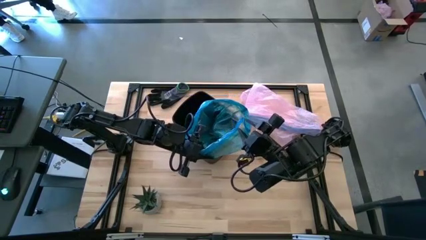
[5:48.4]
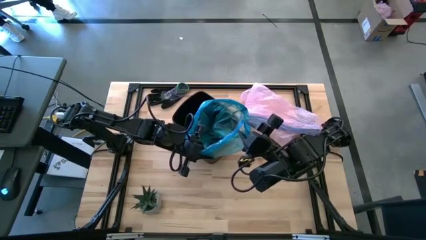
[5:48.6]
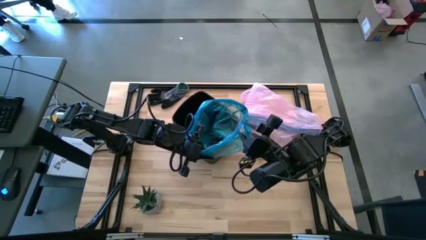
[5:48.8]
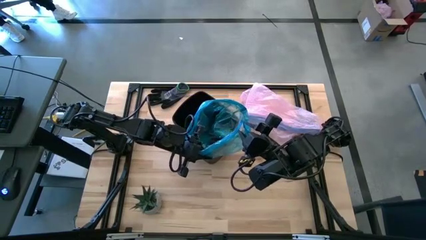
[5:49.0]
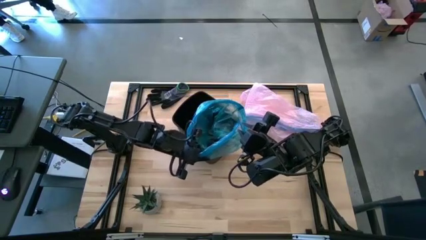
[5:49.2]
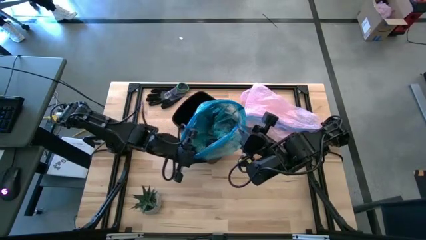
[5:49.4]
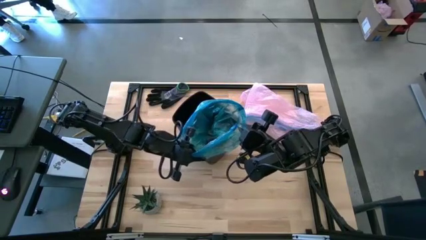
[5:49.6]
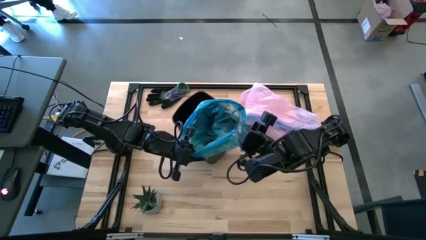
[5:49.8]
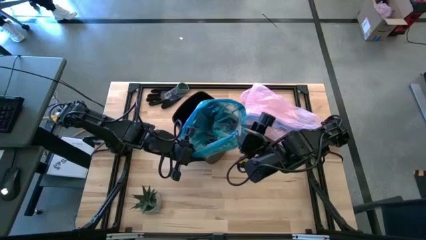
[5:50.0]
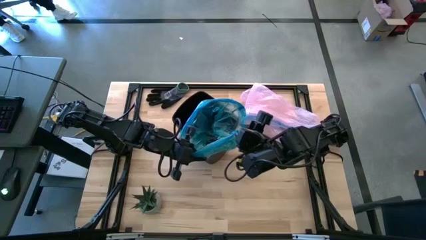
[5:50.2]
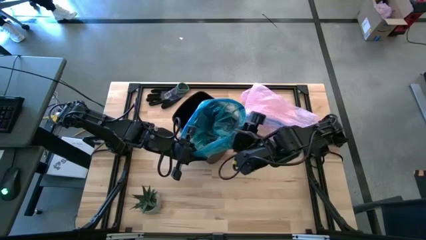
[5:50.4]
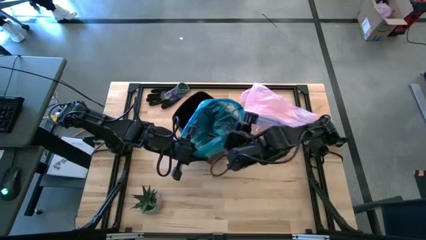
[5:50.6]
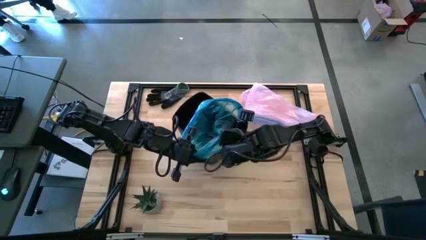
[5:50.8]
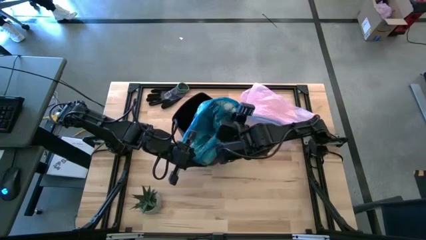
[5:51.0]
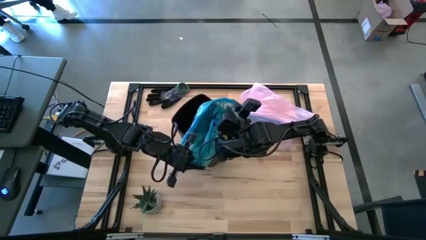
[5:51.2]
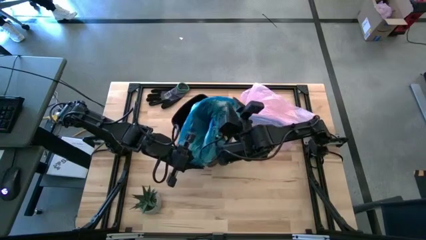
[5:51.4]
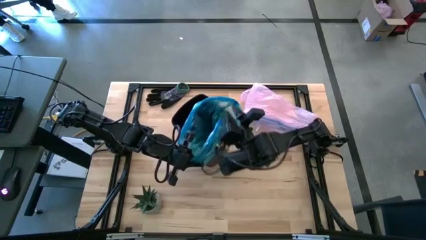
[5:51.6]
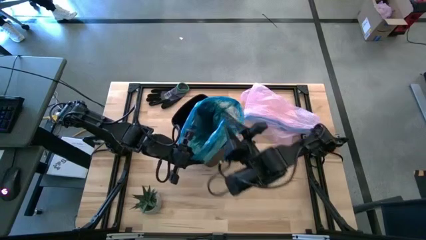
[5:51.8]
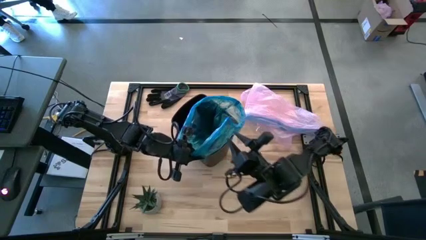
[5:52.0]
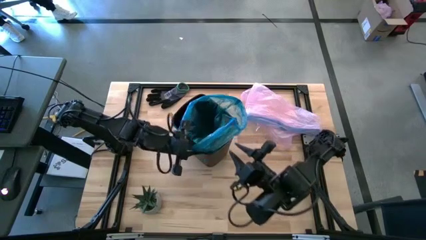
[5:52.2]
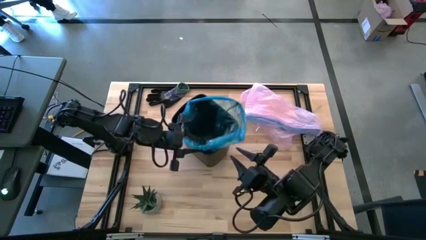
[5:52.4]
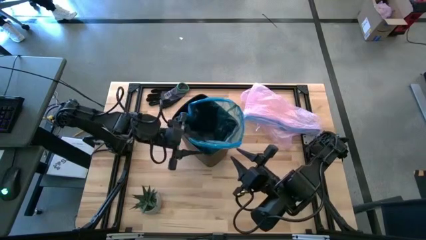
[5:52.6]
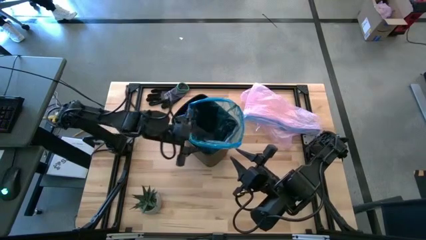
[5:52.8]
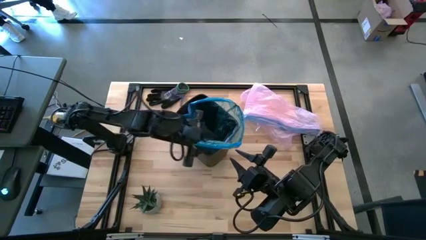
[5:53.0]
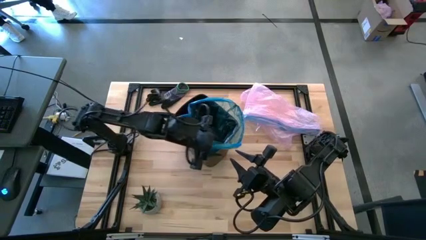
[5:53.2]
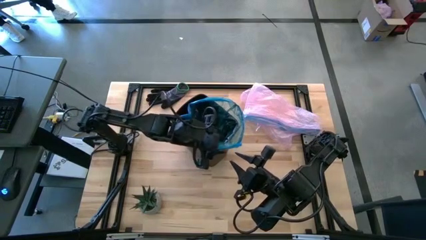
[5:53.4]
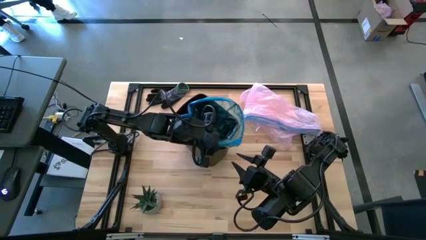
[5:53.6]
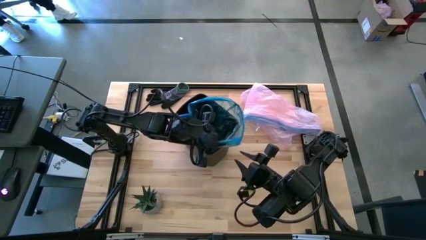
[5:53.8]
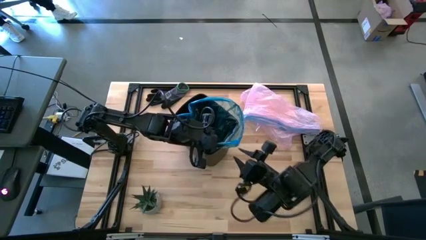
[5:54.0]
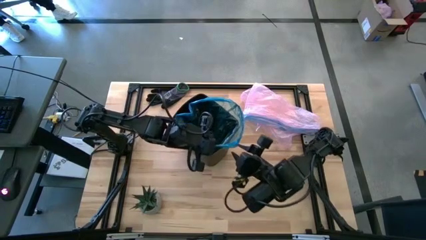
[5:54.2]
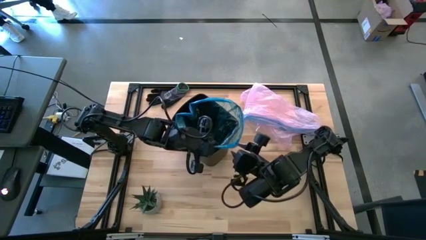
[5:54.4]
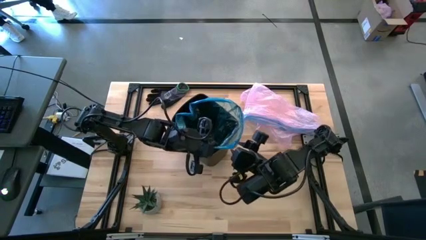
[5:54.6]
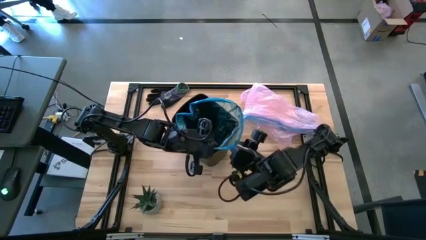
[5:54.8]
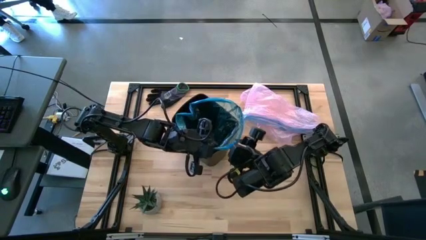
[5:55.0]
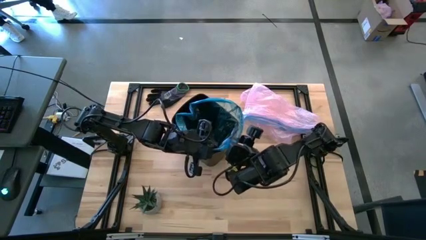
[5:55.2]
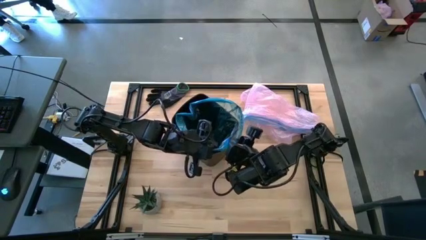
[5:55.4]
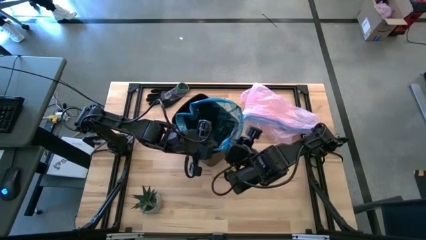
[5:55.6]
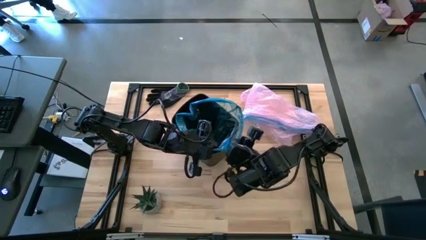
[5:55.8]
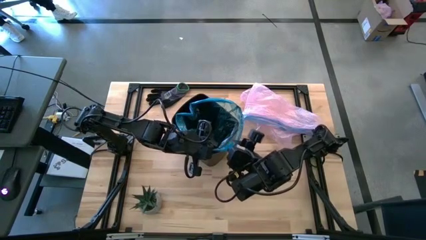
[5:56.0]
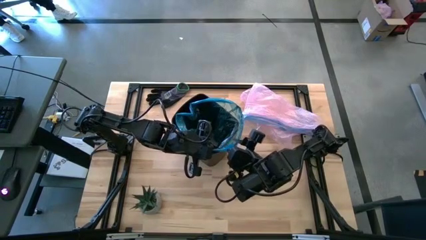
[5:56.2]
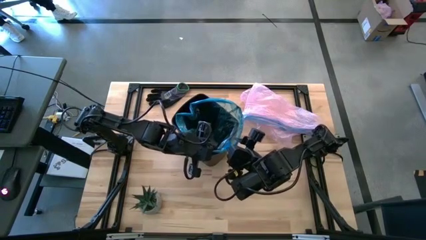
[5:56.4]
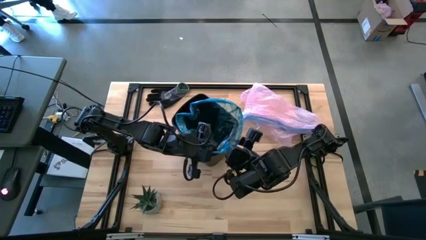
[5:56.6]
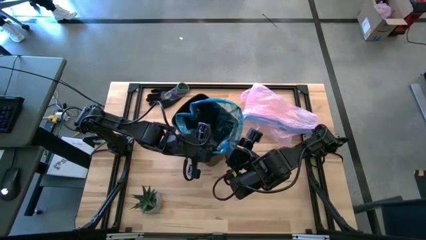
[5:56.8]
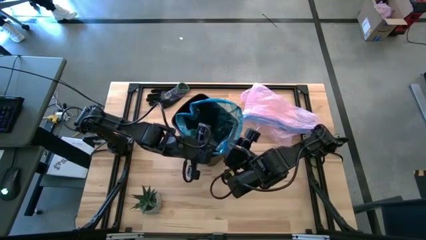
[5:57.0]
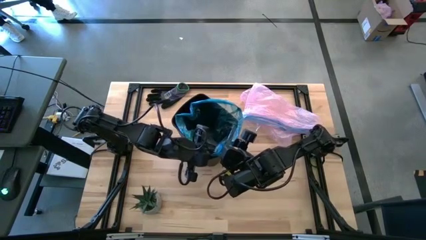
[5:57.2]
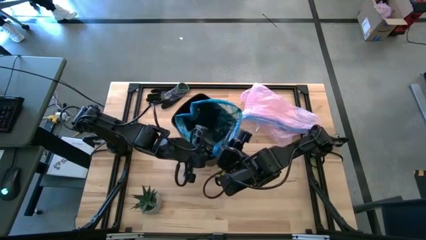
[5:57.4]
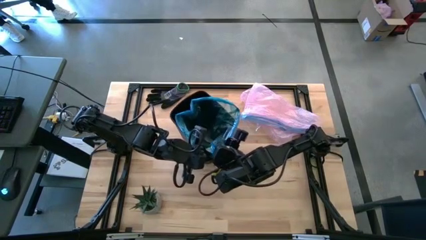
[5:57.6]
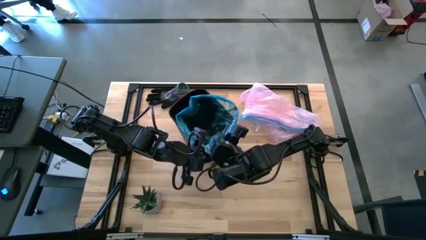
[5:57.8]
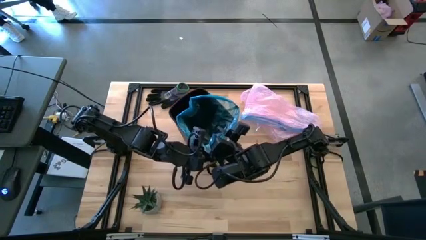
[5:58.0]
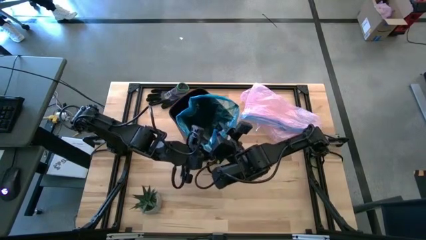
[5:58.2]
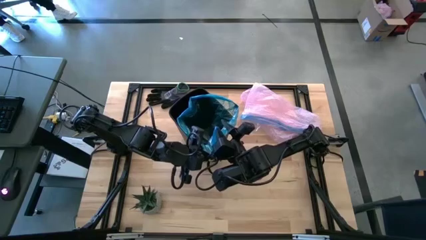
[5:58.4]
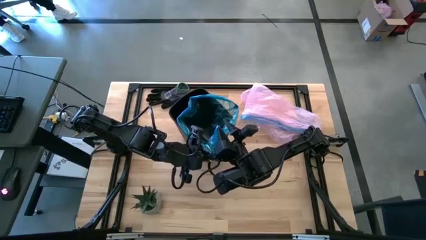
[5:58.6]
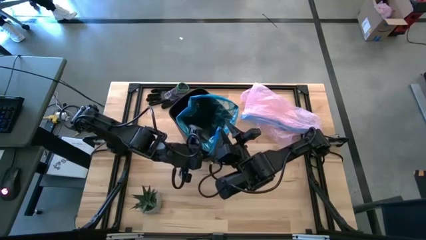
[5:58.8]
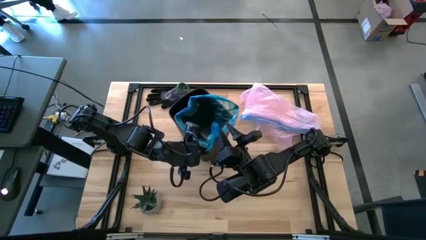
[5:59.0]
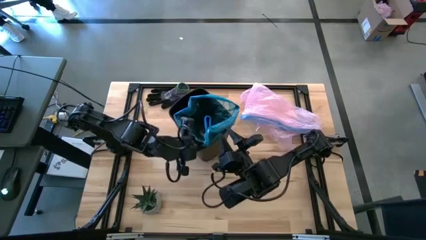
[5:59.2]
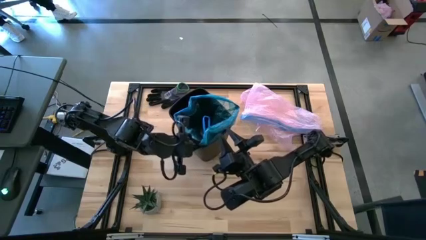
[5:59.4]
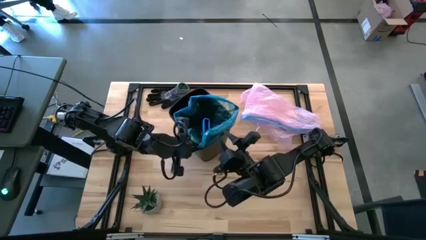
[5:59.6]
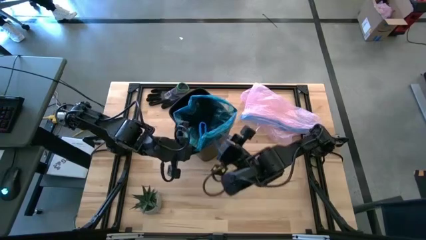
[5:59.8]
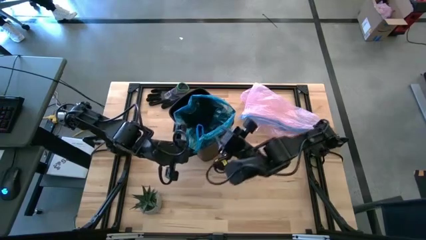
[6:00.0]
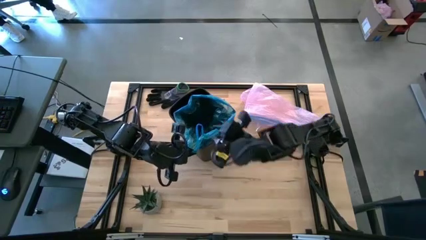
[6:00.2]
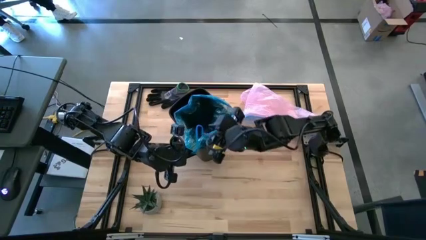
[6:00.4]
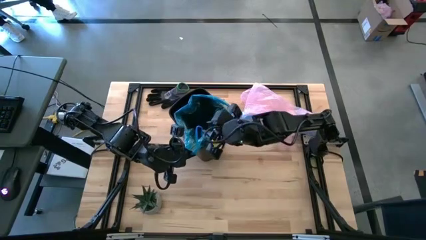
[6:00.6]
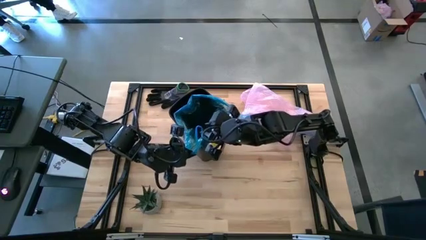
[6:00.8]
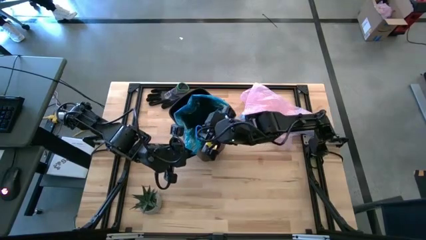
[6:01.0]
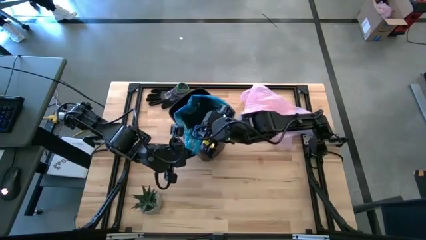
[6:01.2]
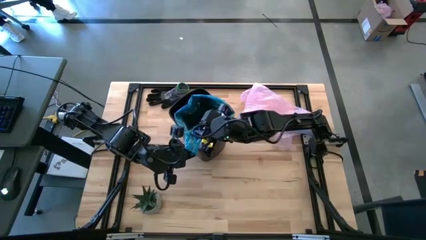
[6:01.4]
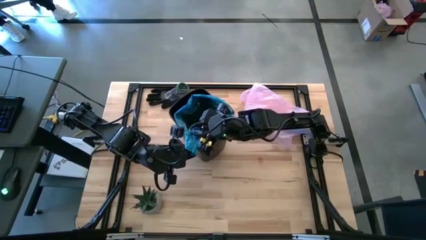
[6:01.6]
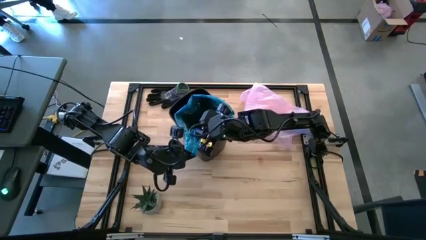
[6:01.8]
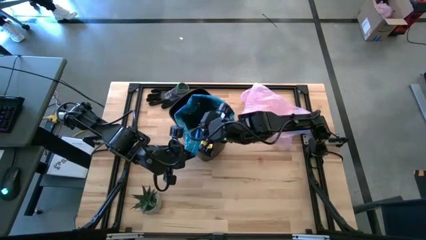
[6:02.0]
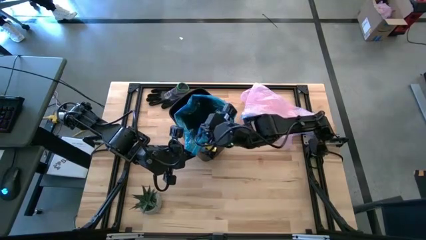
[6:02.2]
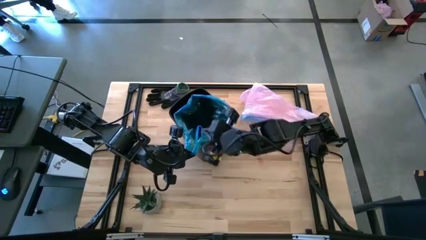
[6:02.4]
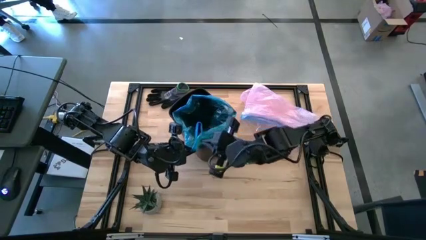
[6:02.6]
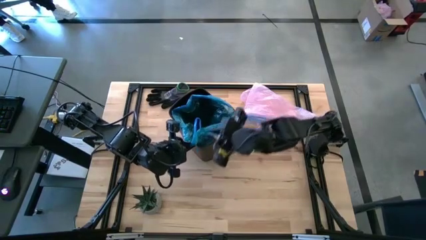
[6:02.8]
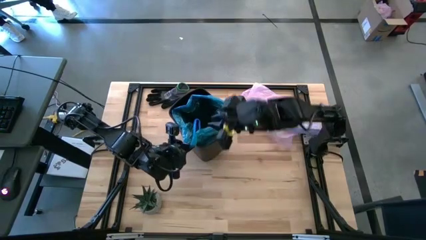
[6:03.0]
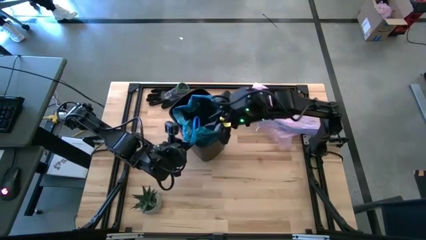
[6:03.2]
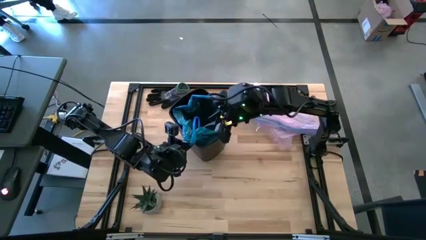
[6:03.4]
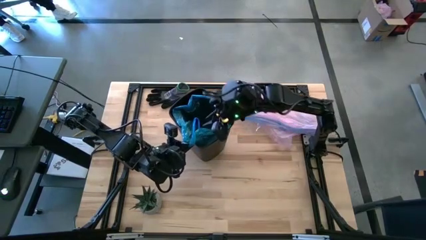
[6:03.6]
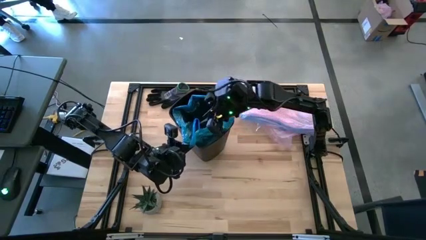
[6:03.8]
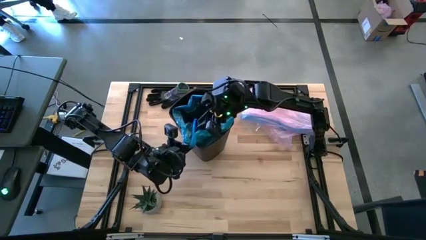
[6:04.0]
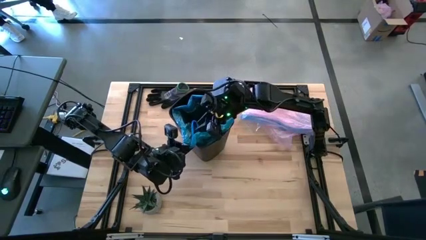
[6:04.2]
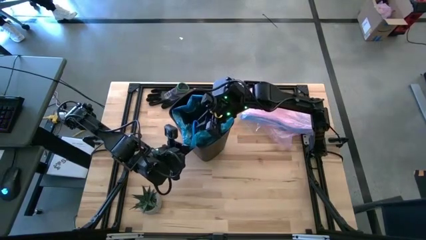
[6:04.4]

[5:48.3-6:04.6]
Task: place trash/remove bag and relplace
Remove the blue trash bag from the trash bin
